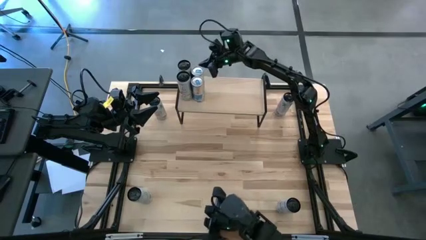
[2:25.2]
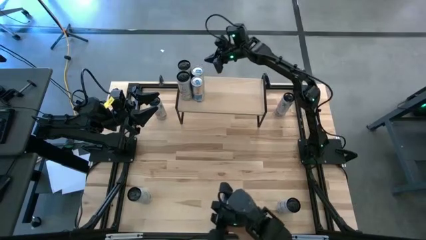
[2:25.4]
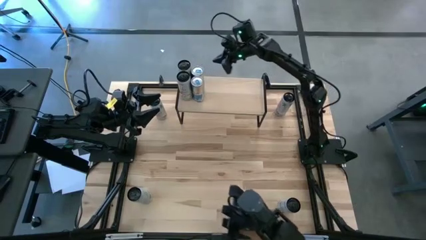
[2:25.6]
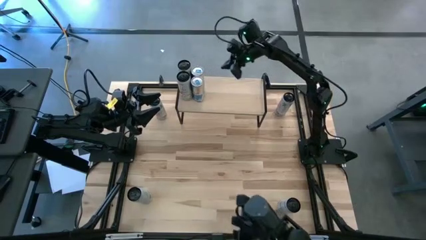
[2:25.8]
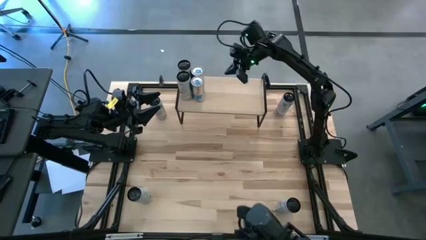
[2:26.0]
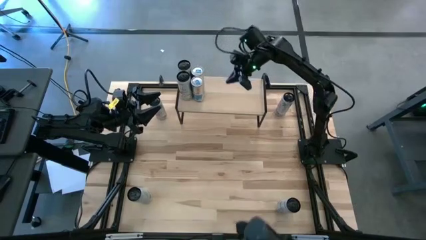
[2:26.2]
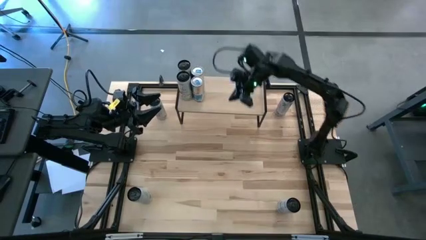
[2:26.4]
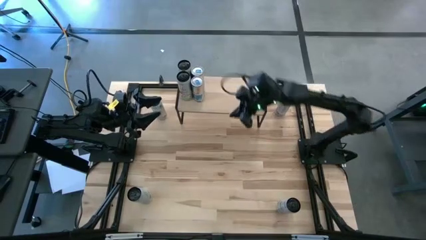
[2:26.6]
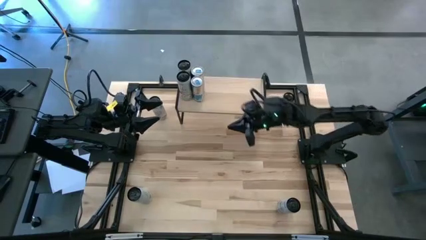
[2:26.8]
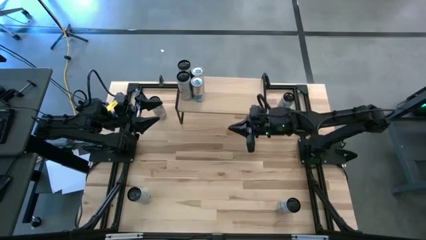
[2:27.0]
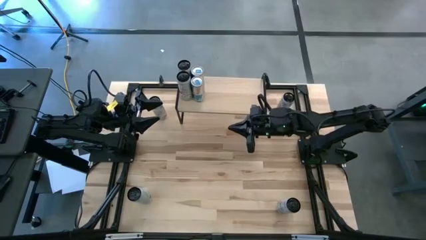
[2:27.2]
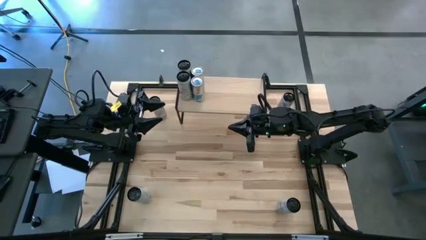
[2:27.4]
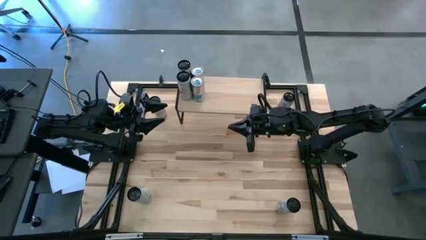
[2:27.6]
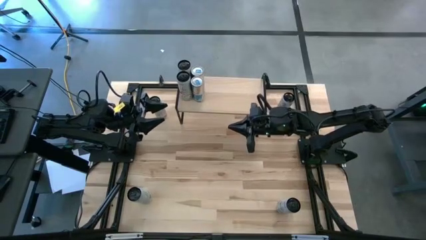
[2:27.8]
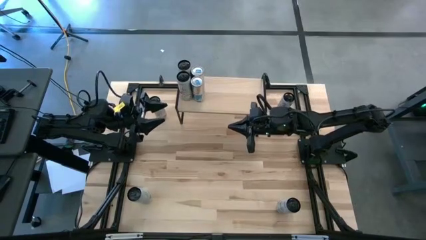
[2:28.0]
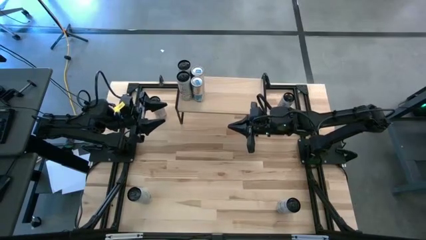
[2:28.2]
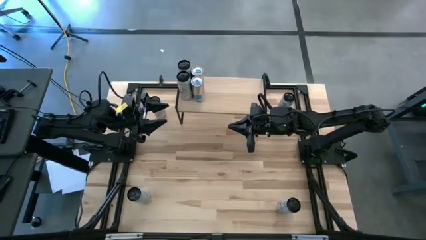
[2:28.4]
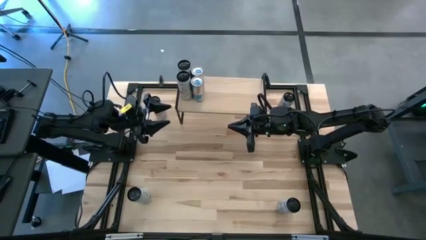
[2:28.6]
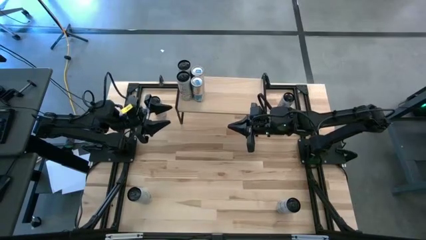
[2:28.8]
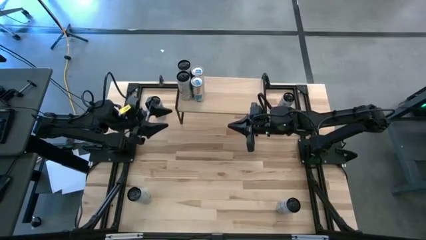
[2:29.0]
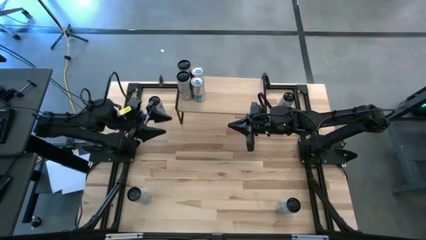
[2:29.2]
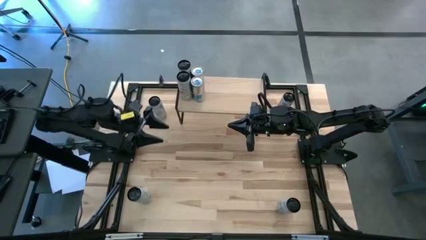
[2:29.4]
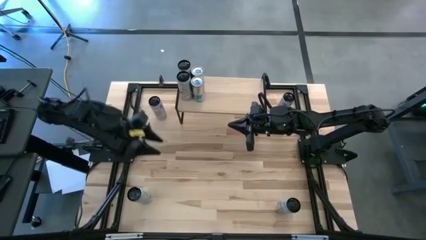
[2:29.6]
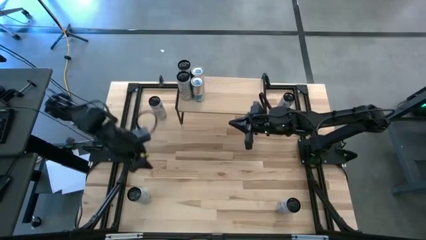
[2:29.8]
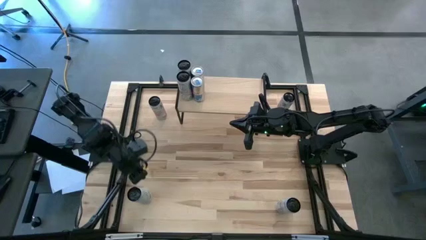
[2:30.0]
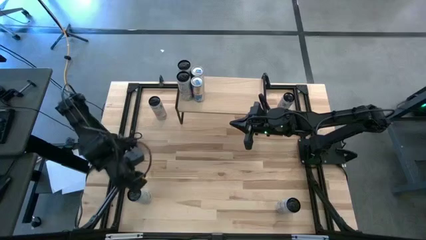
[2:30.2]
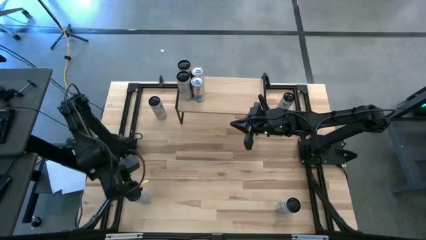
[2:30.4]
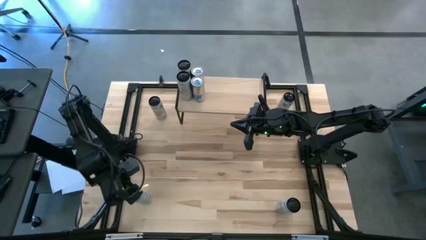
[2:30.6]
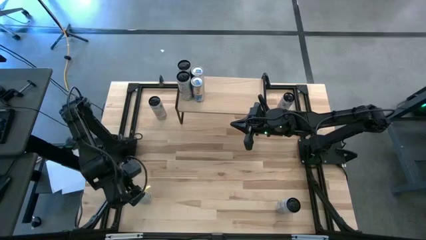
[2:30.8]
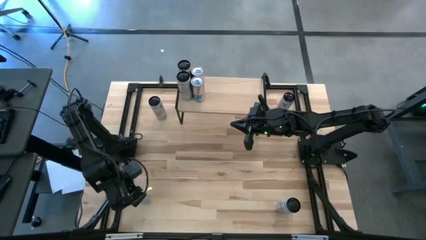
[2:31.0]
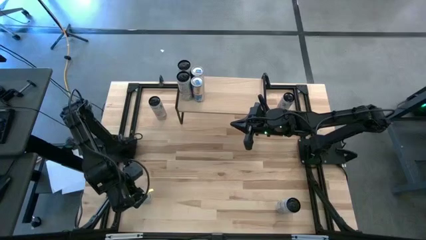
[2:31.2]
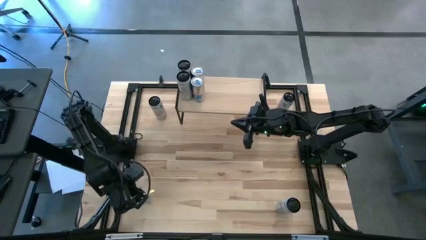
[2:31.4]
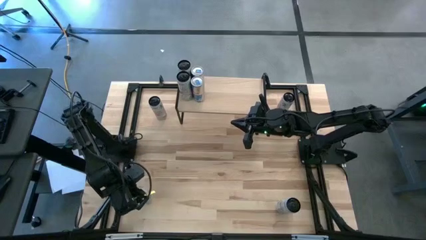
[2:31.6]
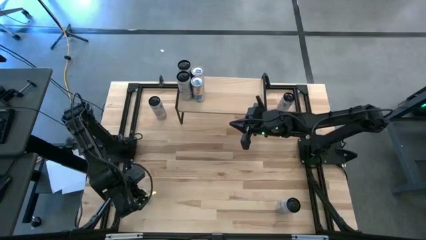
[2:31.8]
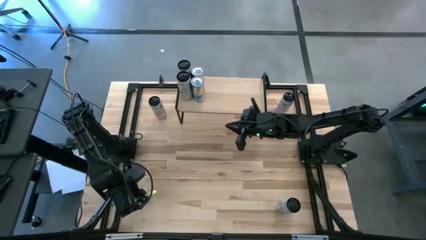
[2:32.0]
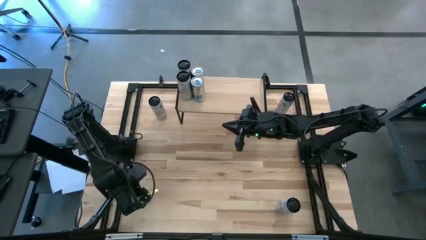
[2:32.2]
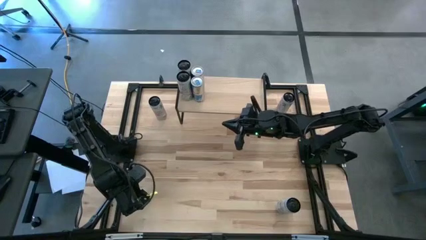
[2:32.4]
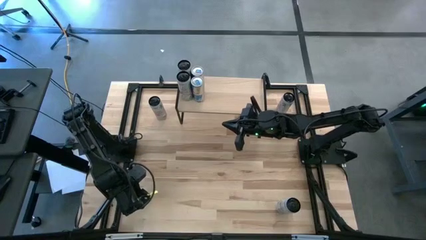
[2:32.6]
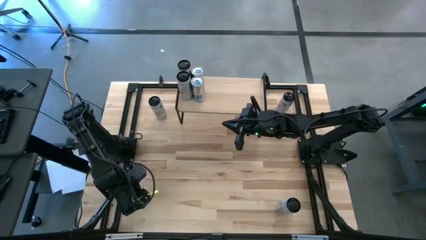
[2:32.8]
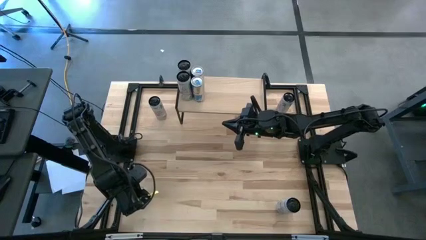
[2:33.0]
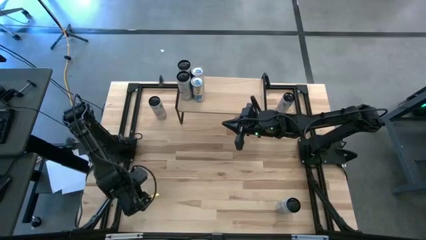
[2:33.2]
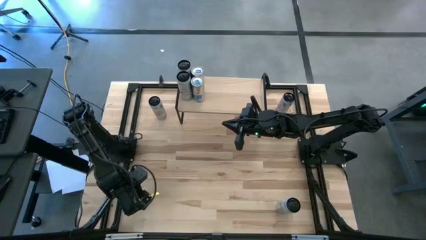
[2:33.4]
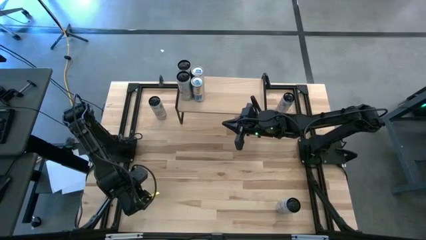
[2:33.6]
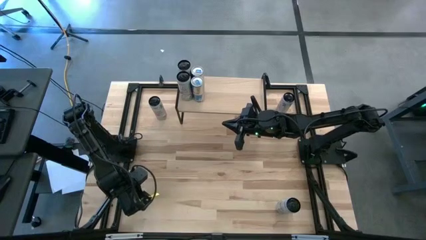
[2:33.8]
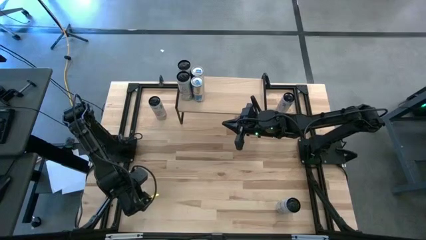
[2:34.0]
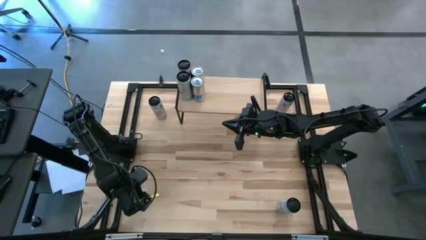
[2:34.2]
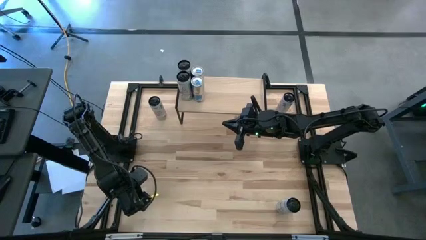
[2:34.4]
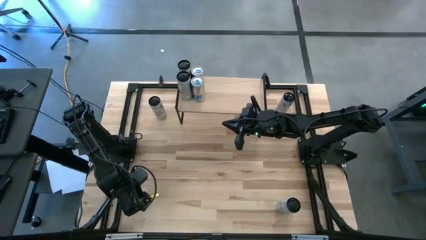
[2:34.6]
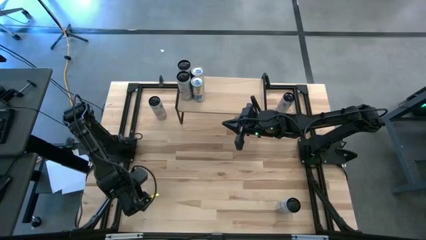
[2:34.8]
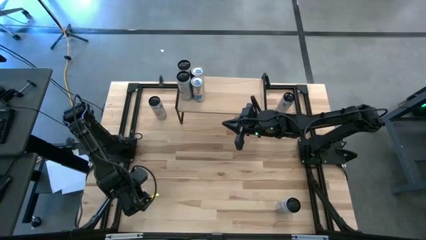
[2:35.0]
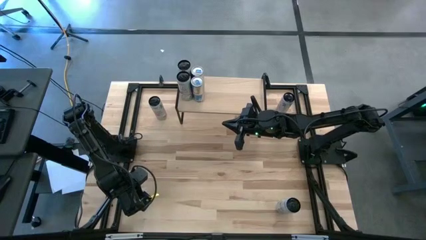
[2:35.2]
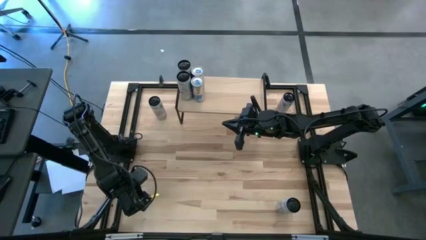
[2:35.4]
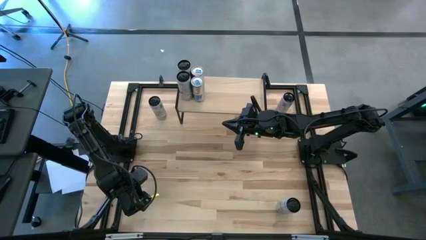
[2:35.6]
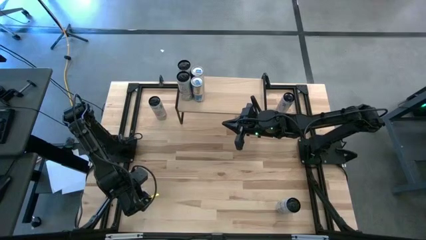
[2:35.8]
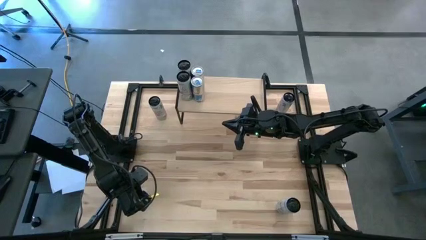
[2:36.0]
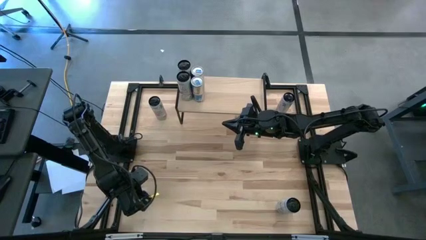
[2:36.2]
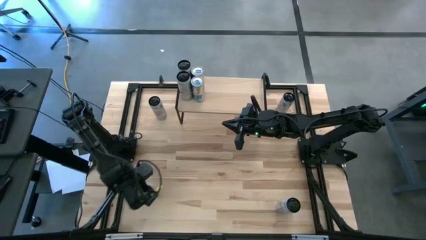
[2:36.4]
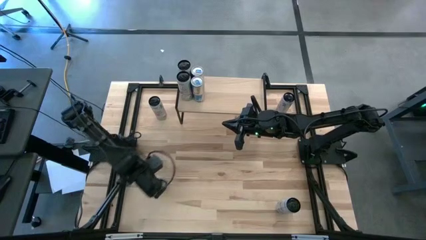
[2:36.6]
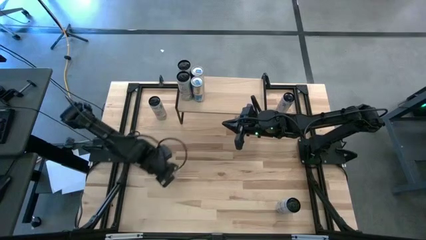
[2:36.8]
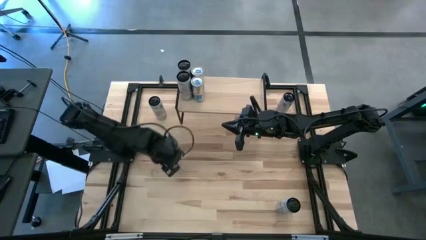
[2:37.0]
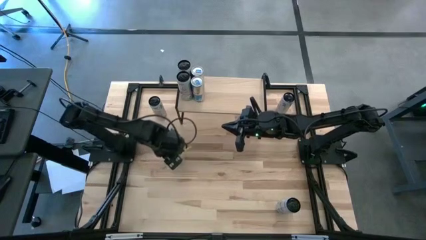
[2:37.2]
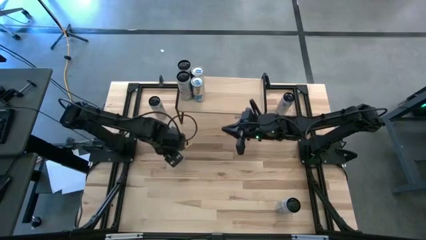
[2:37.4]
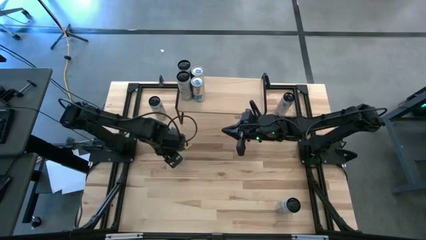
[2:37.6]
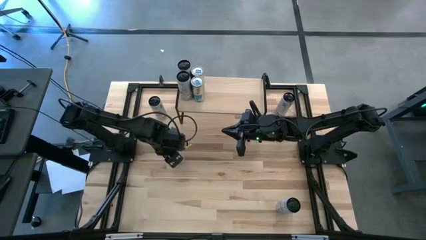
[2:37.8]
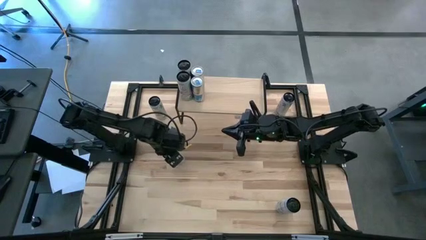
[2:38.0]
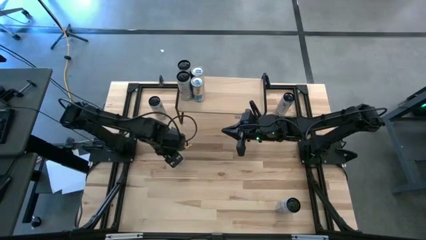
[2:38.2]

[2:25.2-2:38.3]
Task: Place canned beverage on shelf
Put the bottom left black soda can on the shelf
